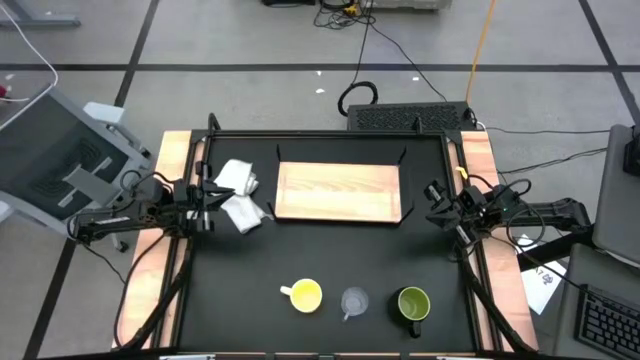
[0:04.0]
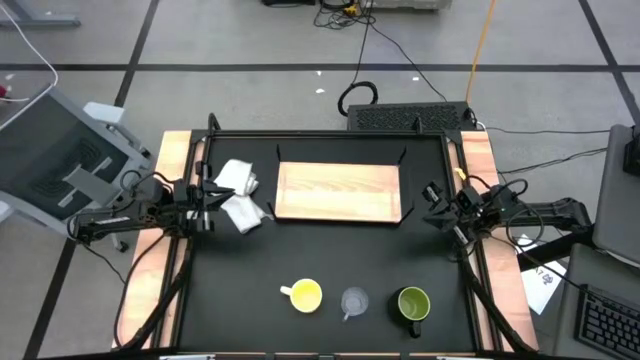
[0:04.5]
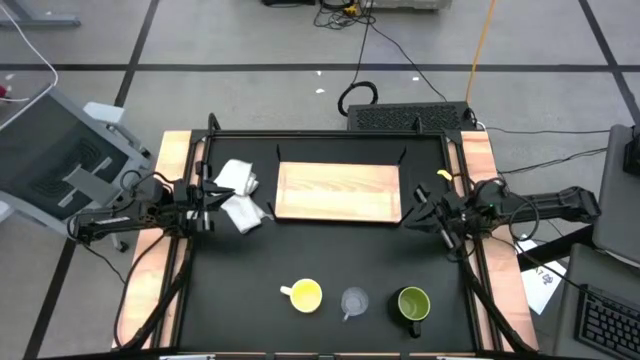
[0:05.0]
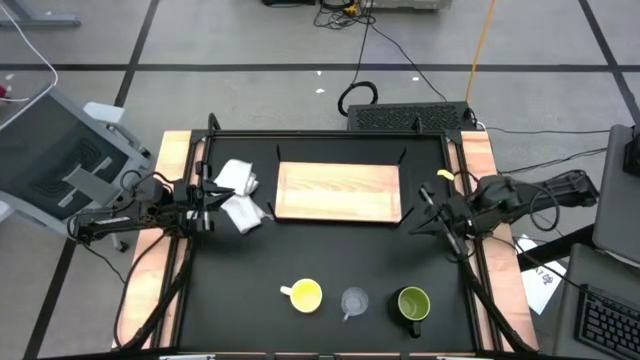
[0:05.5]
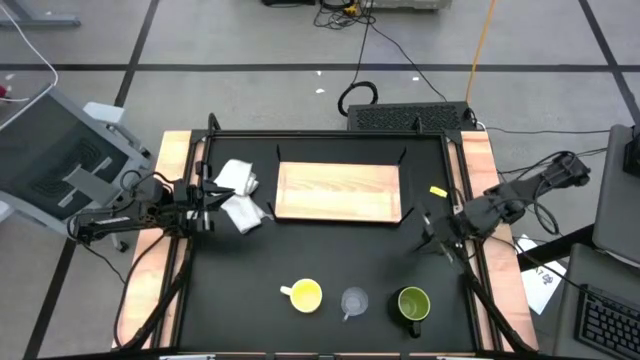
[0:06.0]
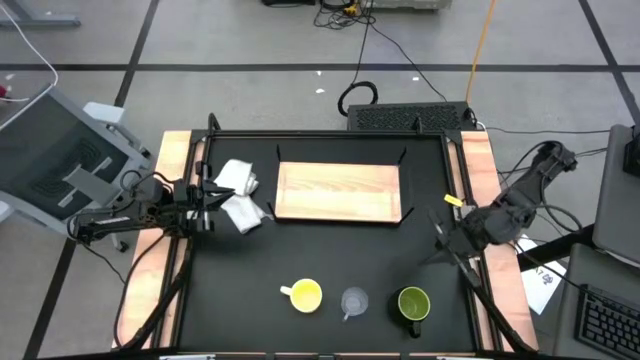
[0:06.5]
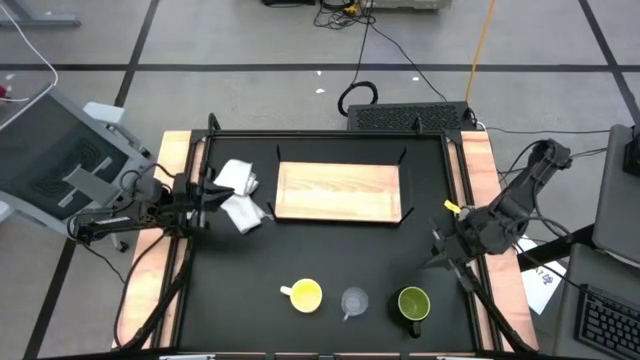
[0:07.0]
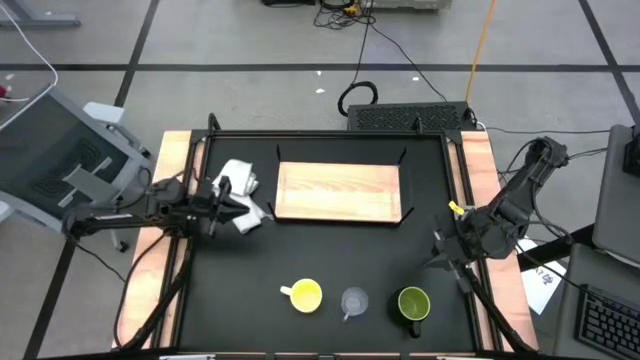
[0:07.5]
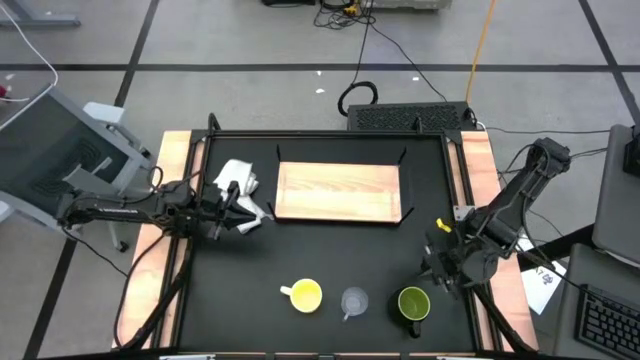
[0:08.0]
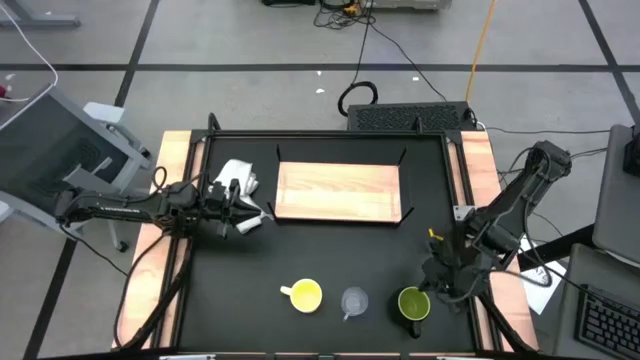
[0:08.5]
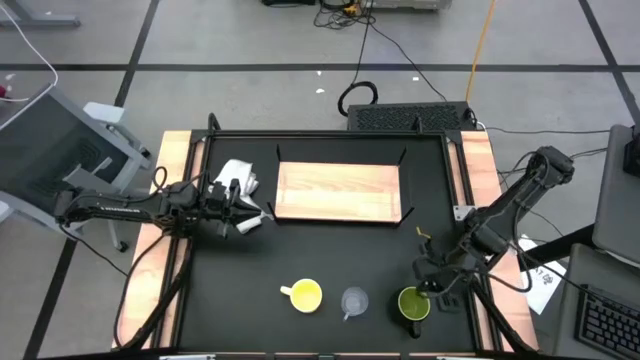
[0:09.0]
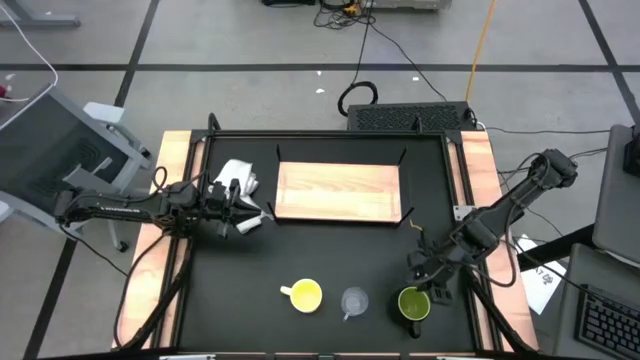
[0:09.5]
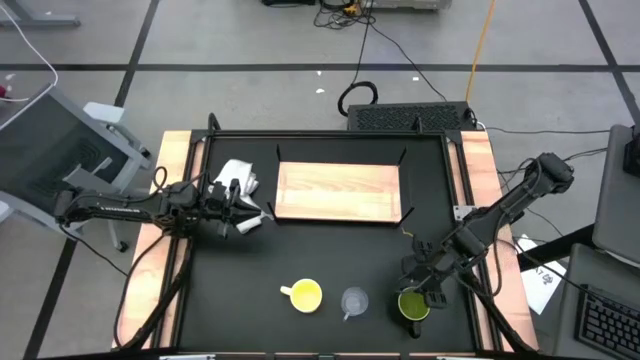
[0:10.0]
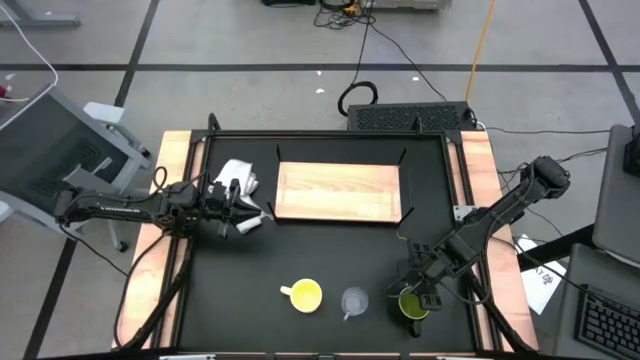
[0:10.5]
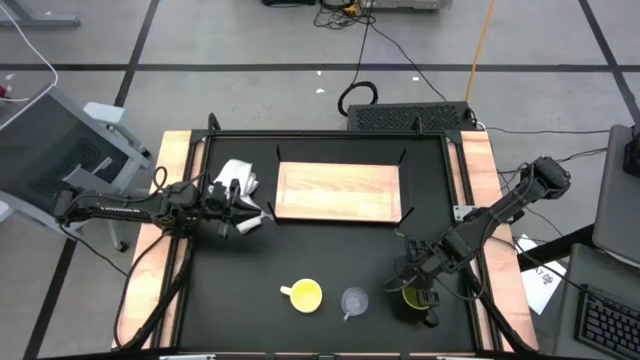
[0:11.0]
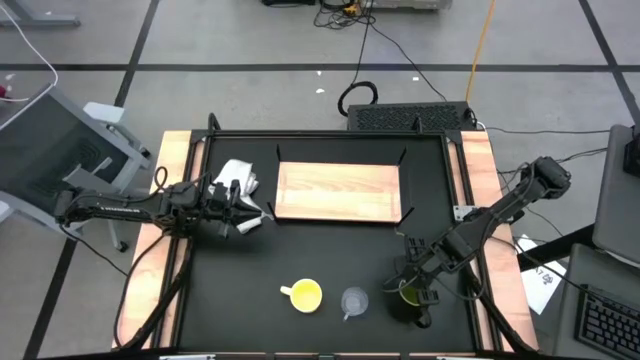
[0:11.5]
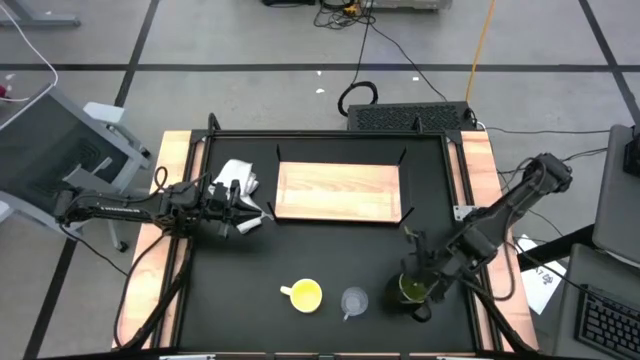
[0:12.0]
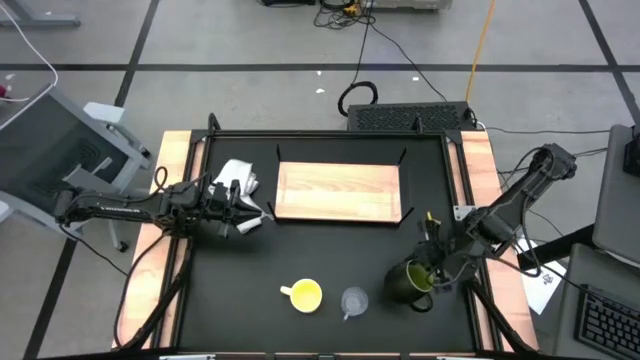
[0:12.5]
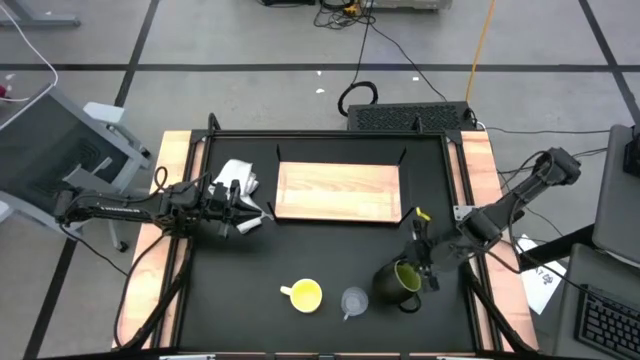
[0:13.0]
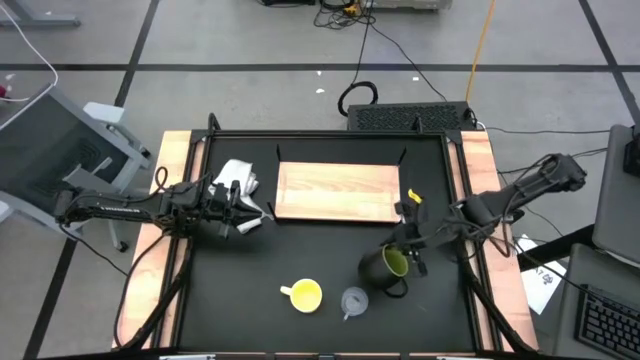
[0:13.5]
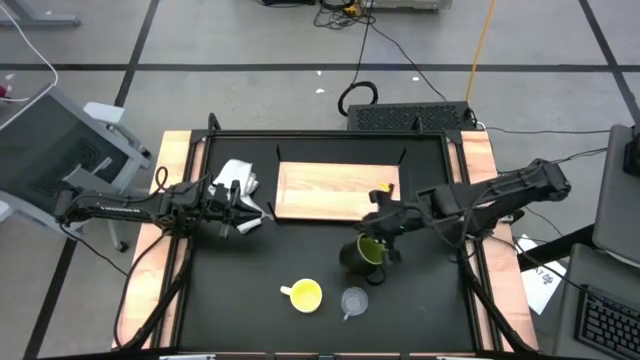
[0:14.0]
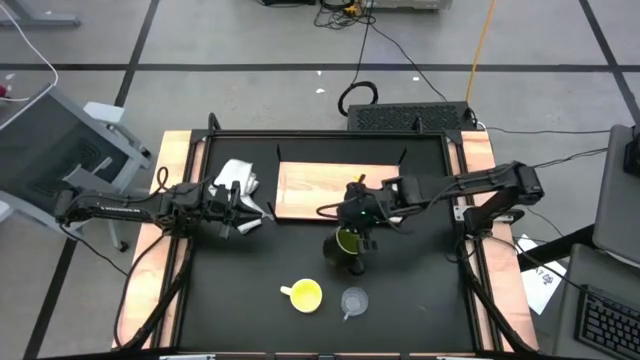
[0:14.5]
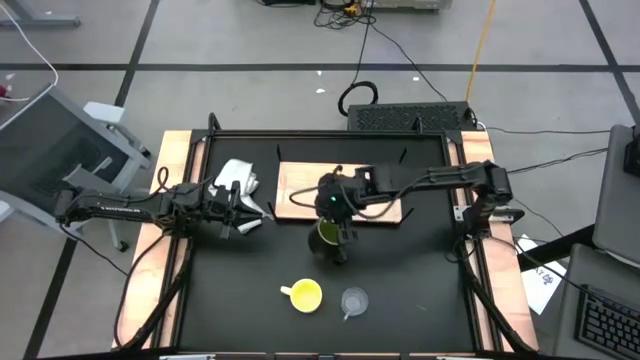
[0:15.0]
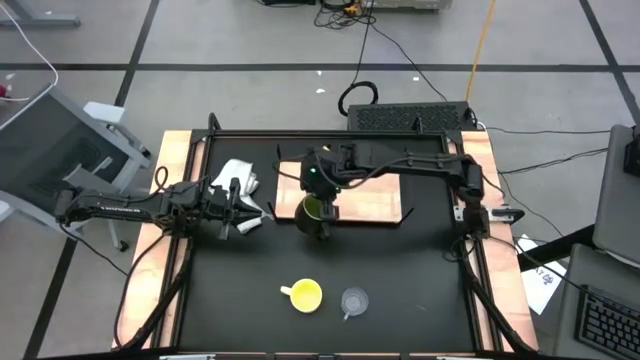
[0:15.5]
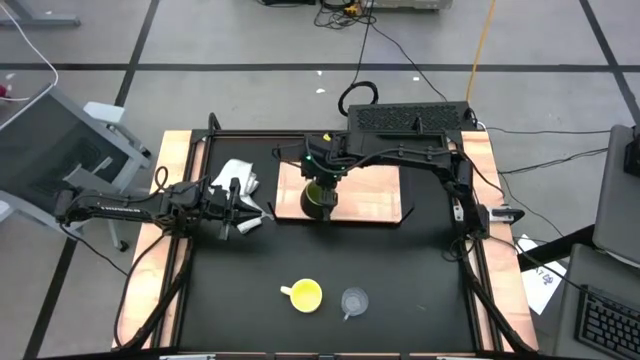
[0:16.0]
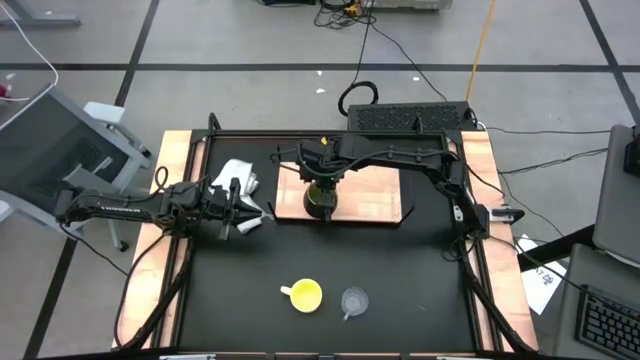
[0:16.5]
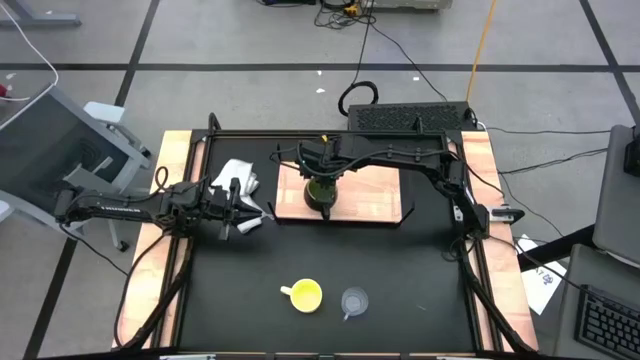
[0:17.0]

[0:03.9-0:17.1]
Task: Stack small to large cups/mugs on shelf
Put the black mug on the shelf
